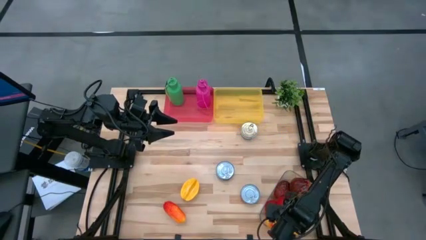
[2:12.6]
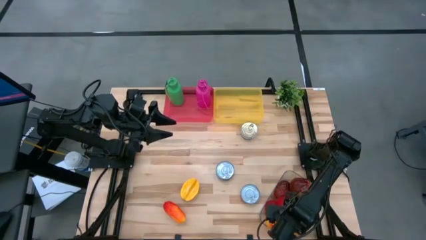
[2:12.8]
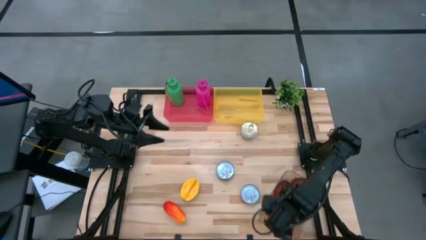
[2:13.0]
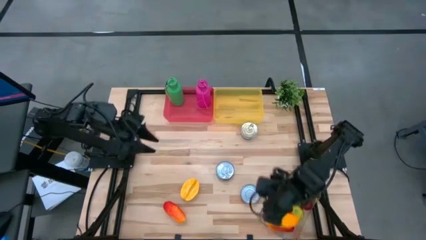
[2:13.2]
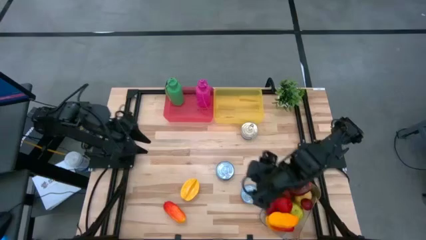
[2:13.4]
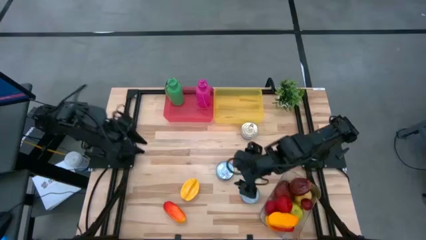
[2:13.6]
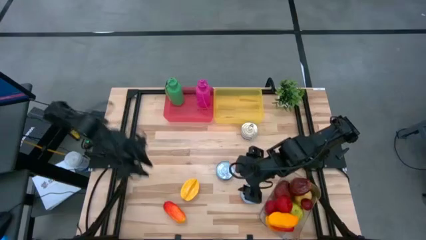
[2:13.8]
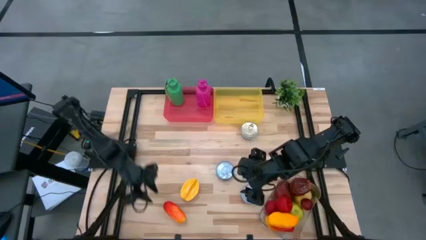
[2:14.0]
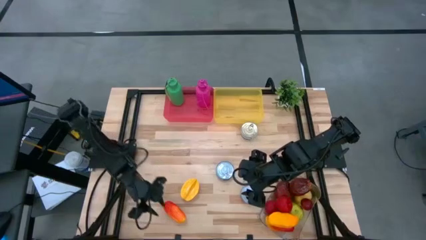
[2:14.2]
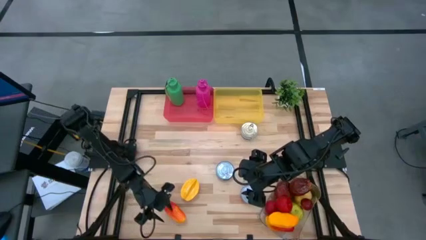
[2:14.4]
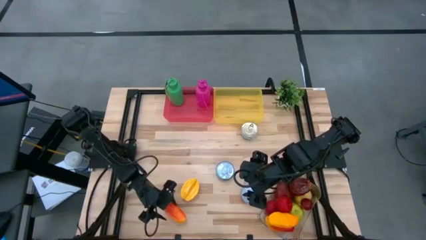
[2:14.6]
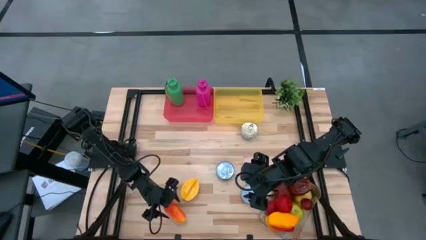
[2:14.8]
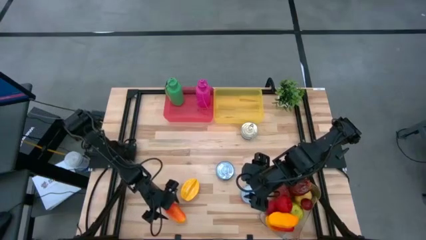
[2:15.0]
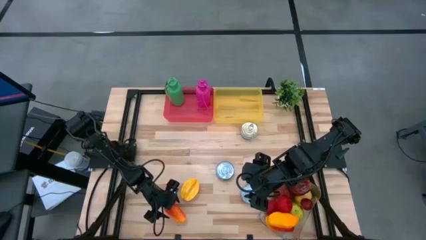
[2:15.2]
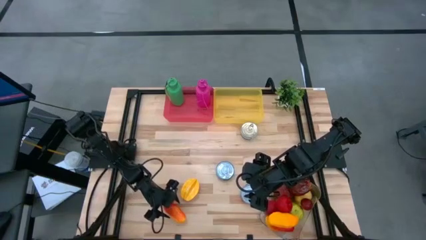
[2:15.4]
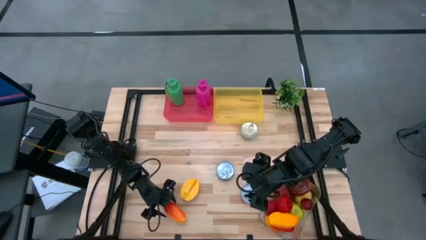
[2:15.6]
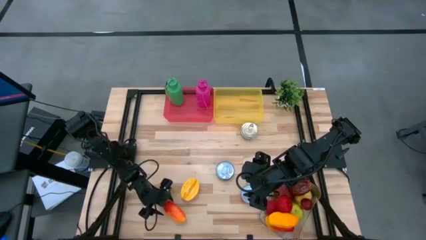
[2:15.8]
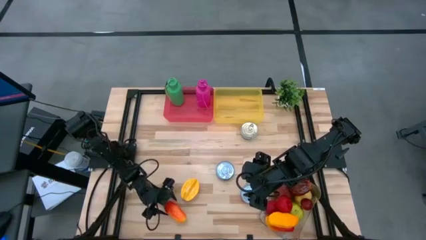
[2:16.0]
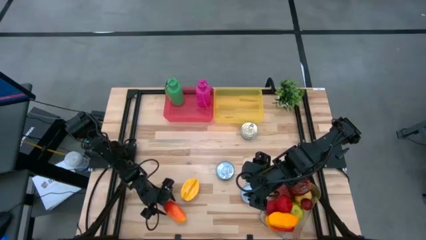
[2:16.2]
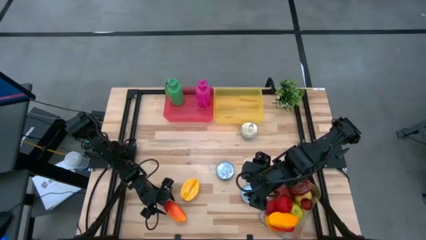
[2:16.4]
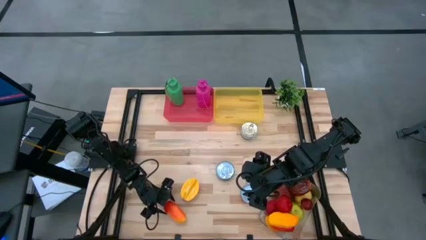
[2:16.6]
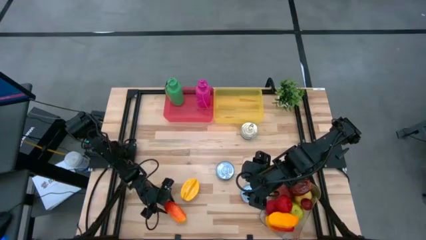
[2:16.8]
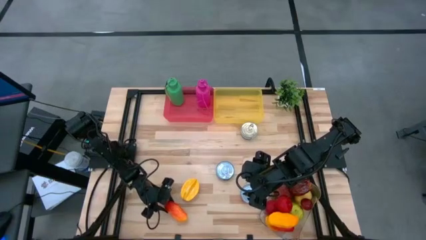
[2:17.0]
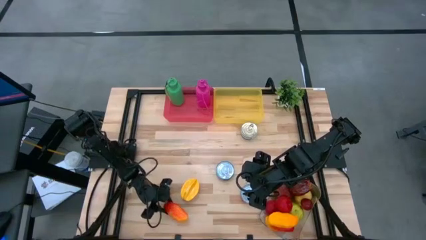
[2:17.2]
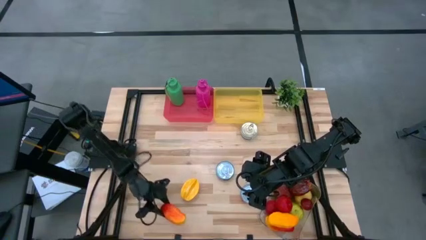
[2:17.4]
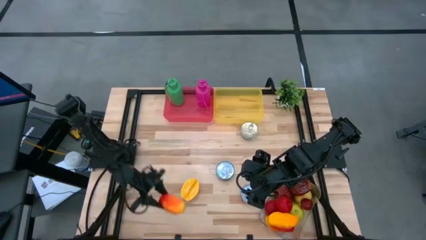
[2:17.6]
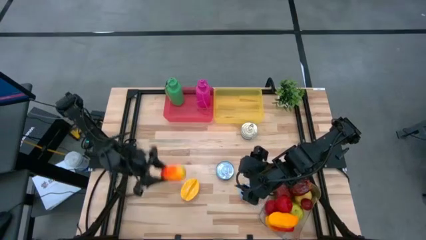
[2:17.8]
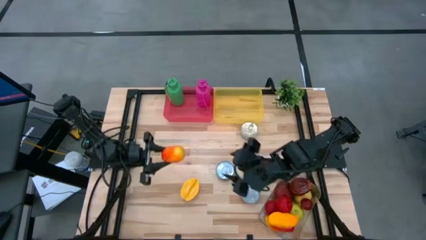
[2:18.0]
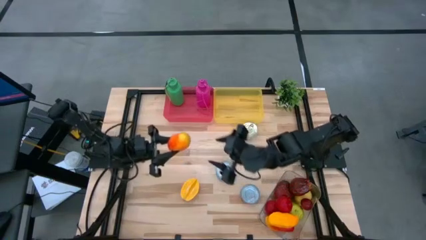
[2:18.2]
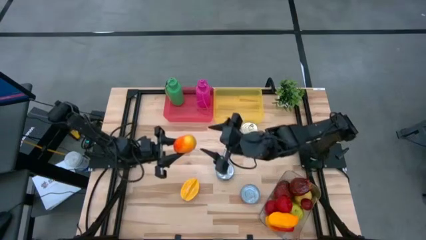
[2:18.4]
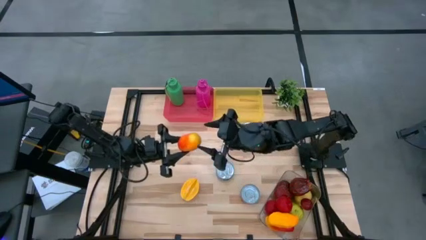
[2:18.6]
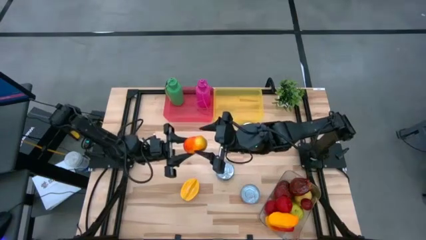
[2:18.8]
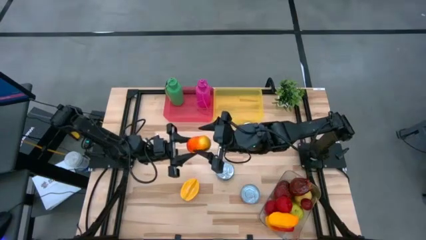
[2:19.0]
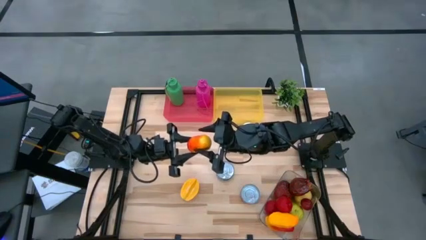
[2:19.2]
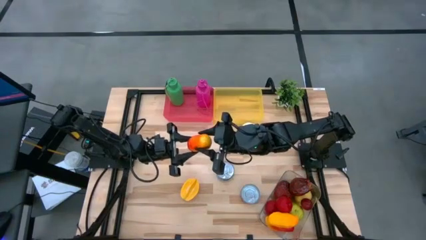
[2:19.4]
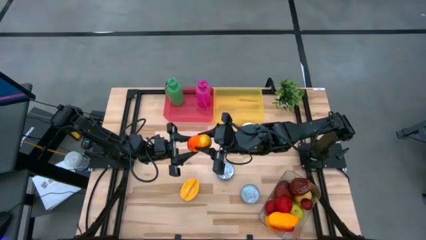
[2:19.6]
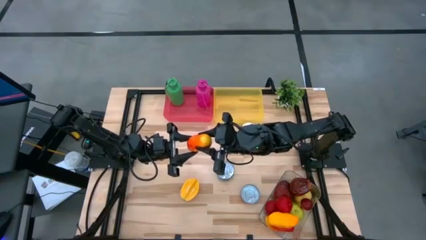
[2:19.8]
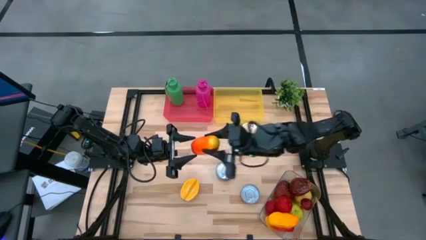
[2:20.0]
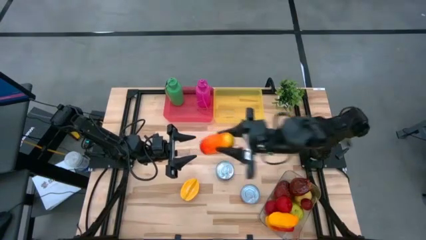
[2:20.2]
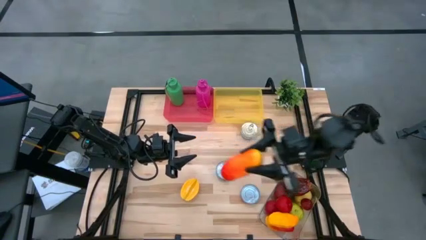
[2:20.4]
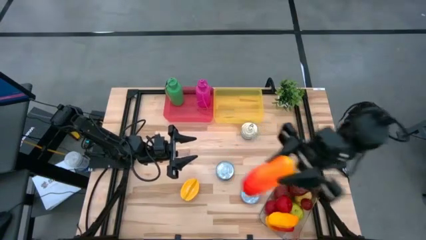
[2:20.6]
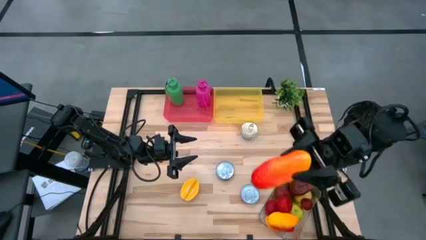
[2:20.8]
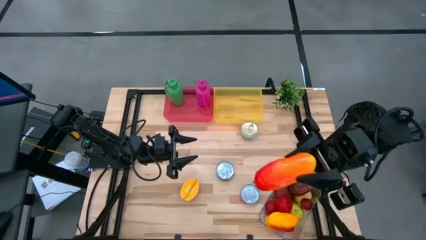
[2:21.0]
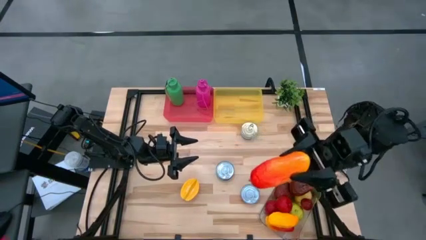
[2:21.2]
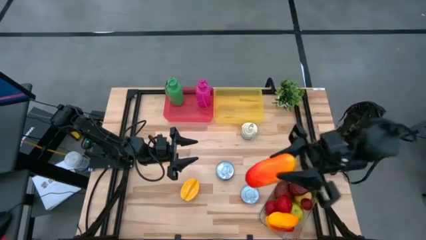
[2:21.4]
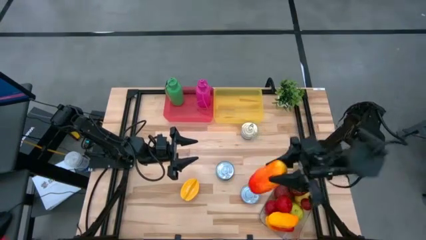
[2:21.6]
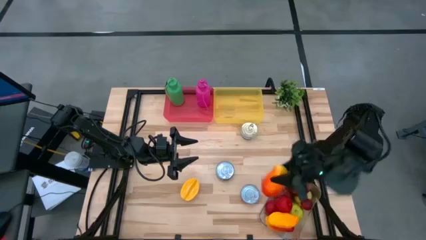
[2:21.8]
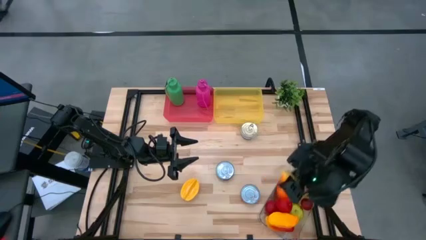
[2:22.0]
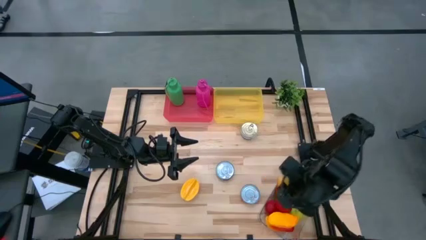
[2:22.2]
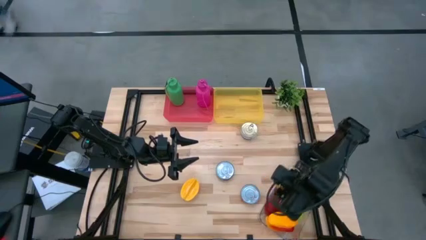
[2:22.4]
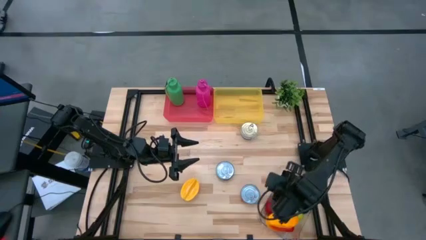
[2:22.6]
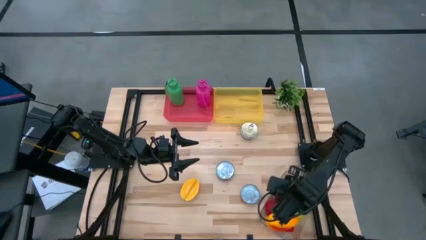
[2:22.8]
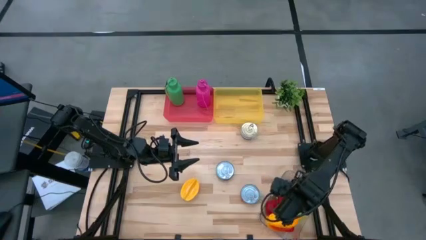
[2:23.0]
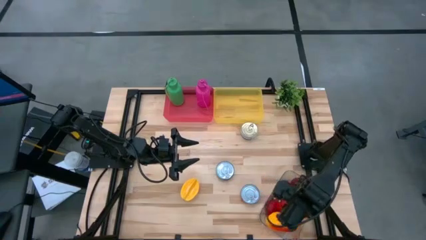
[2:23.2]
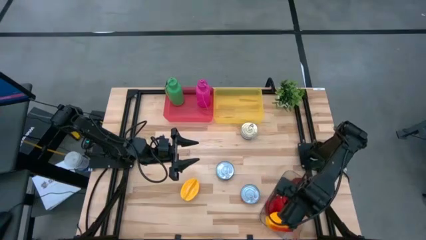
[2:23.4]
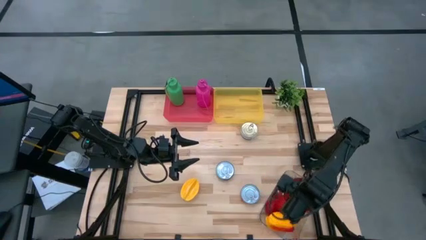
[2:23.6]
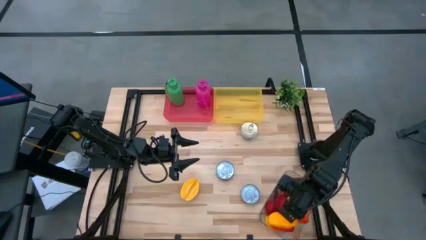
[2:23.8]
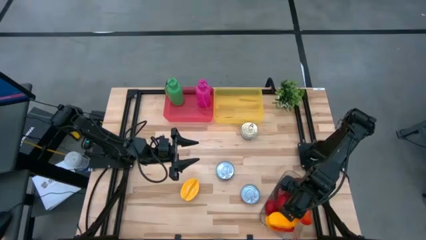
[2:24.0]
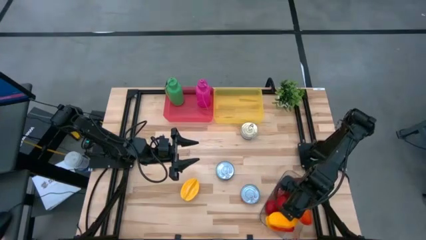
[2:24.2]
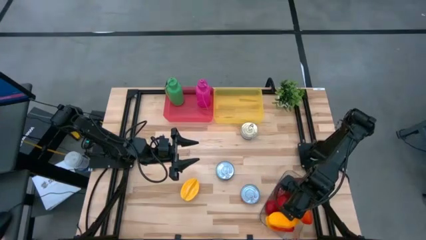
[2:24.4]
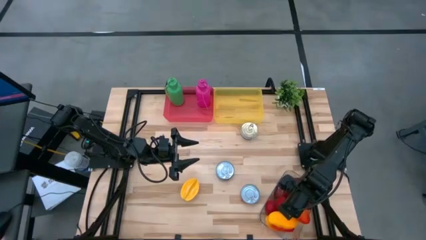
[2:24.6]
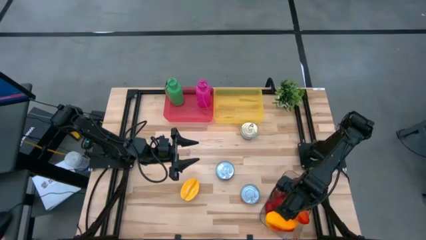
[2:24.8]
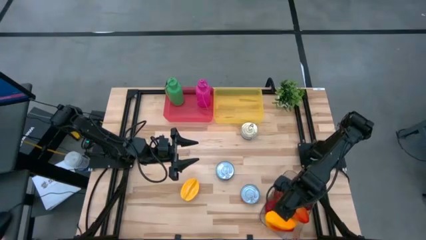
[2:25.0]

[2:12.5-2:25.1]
Task: Pick & Place Food Item
Put the mango into the transparent bin

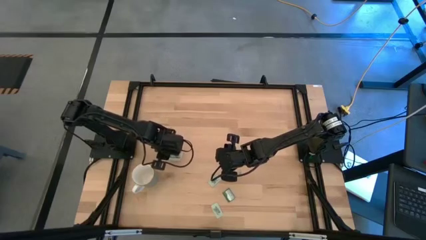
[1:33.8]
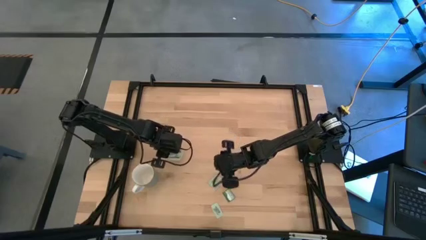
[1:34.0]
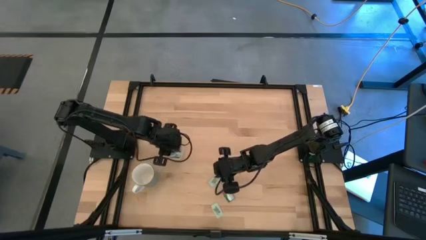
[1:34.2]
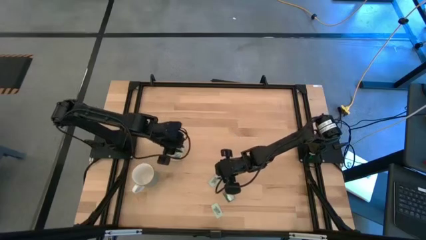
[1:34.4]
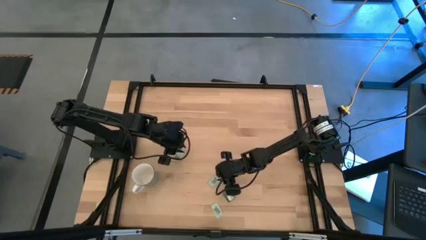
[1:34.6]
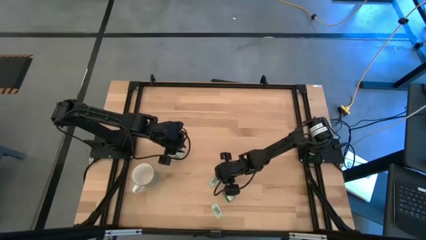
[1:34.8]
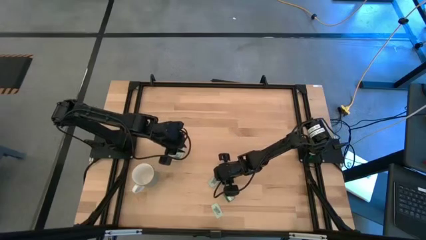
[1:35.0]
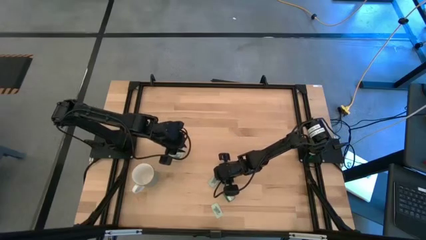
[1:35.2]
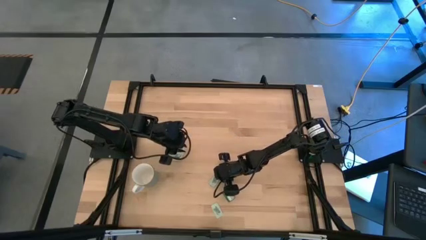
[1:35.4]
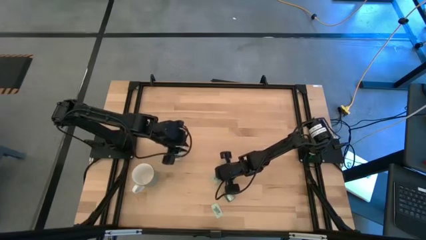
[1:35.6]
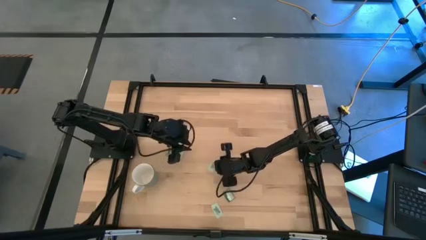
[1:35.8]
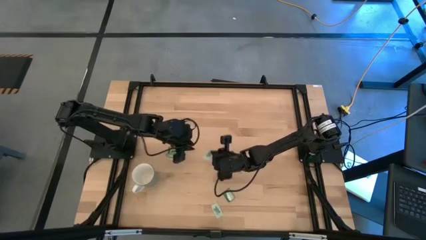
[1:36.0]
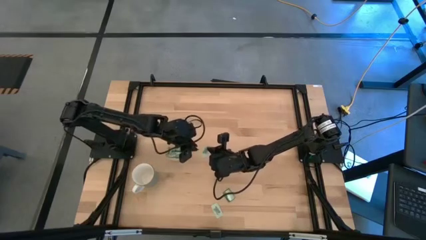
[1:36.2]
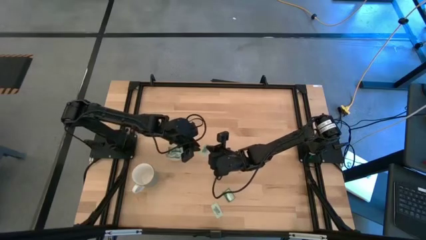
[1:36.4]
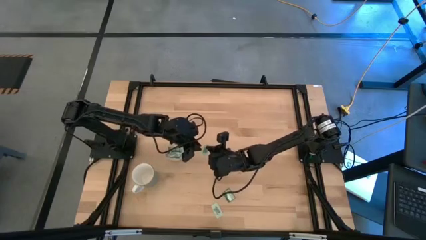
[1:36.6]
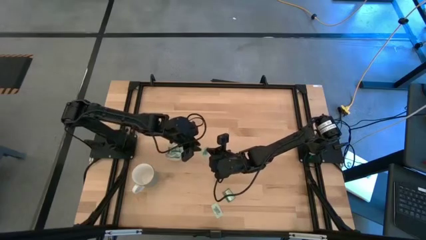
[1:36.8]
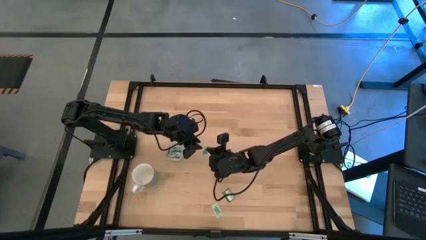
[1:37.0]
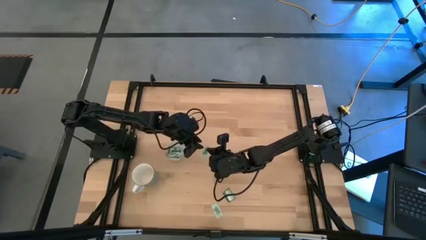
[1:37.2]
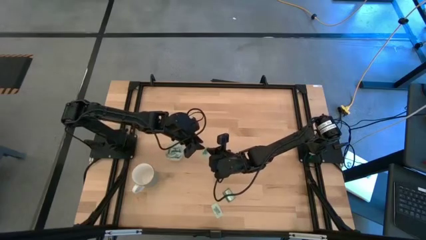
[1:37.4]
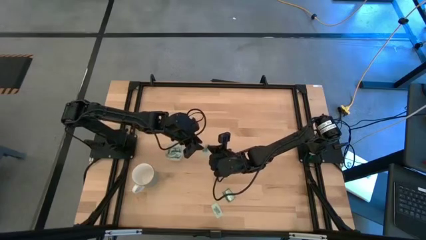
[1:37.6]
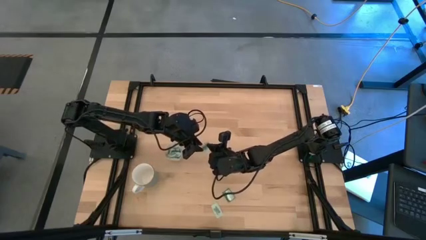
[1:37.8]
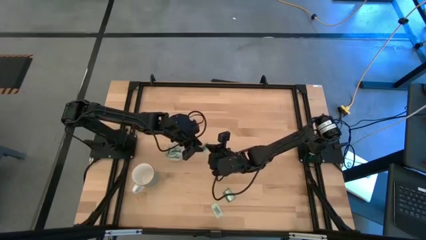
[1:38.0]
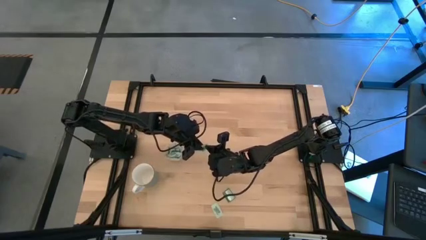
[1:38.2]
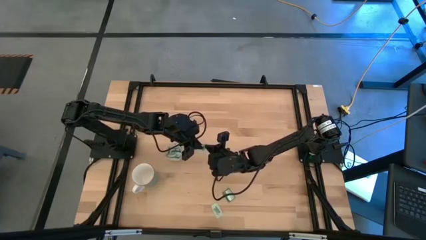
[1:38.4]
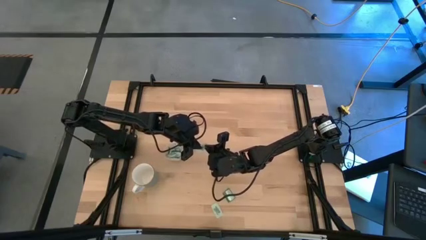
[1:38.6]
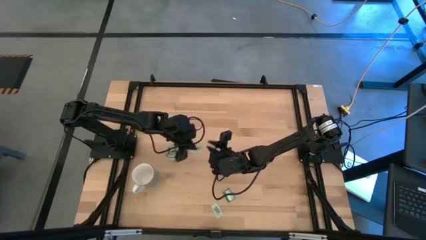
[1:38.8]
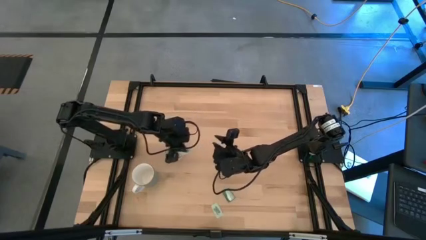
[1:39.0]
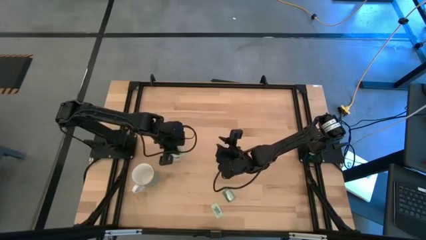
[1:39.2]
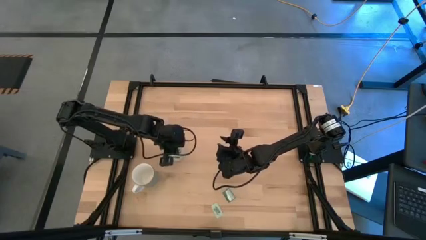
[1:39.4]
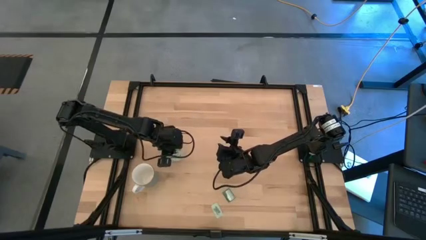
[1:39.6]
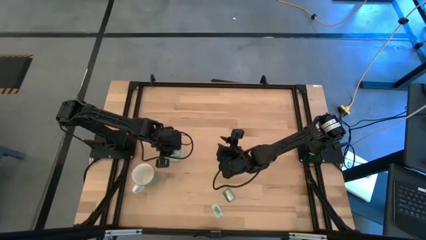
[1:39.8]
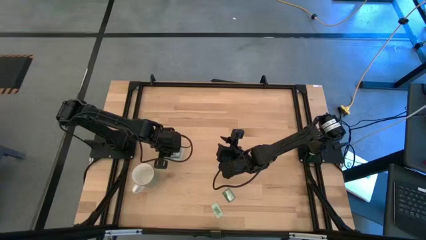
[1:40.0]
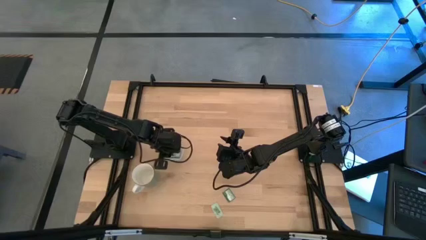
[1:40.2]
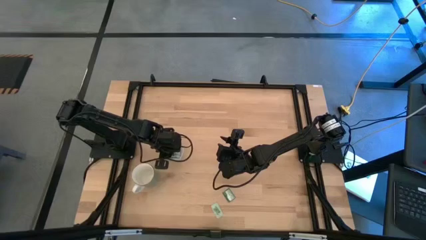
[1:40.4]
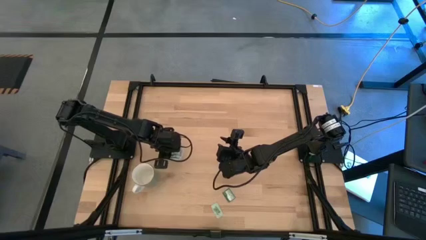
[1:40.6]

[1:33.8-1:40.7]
Task: Pick and place Stevia / Truvia into bins
Put the green stevia packet into the transparent container
